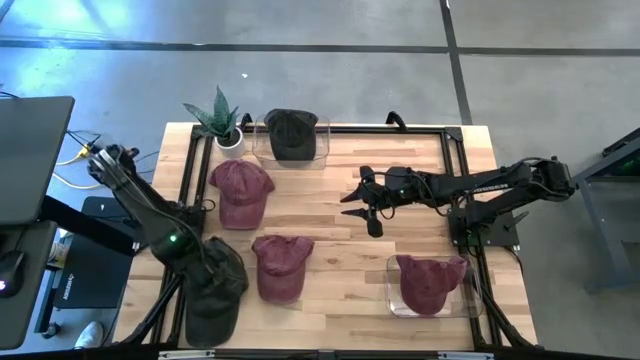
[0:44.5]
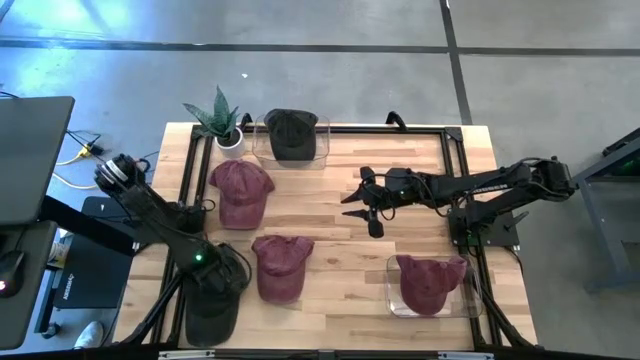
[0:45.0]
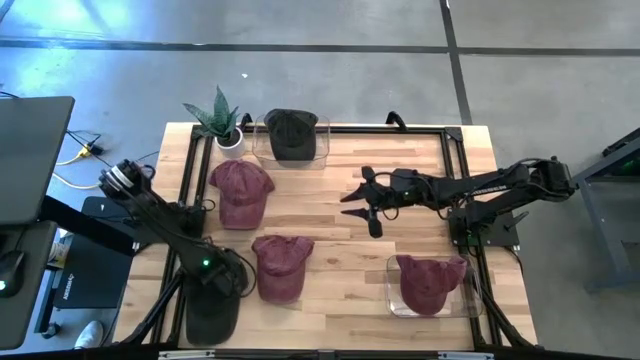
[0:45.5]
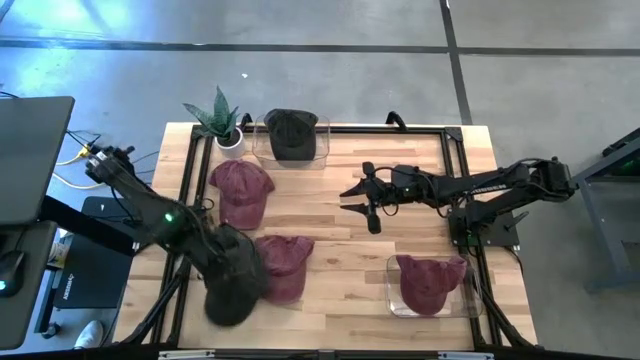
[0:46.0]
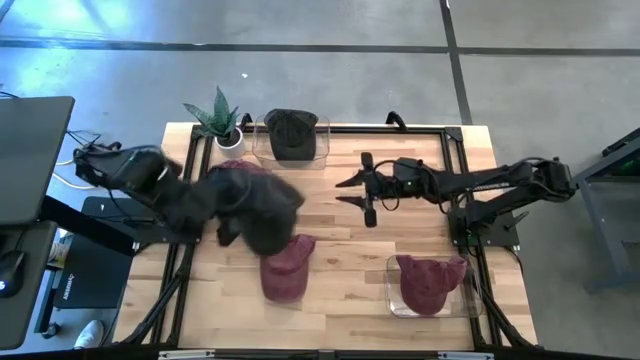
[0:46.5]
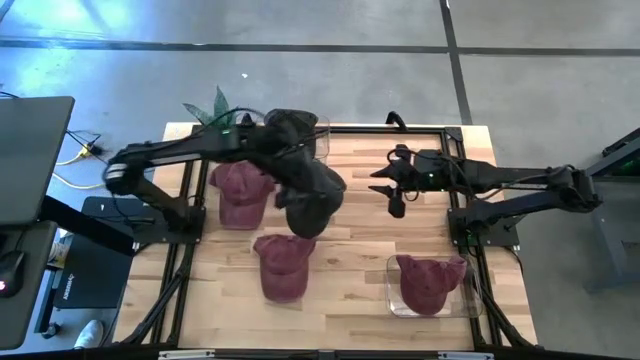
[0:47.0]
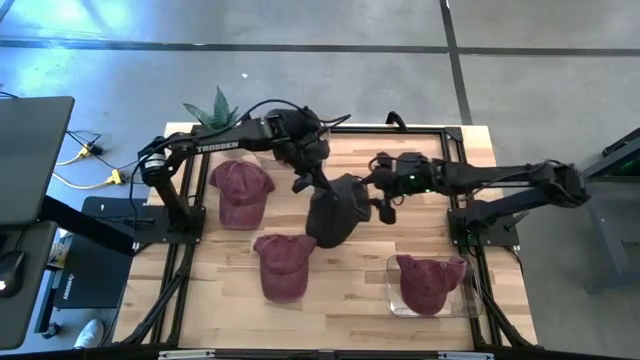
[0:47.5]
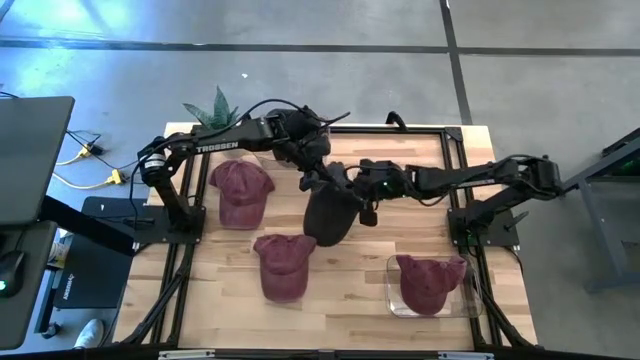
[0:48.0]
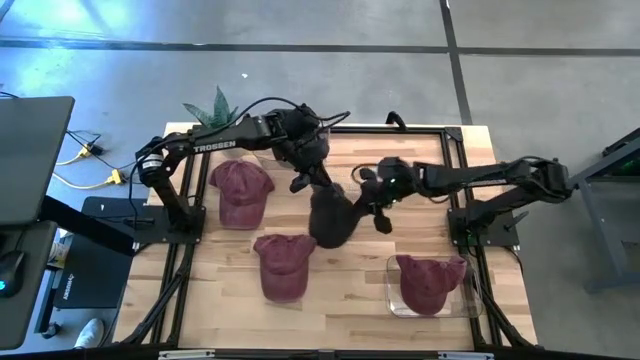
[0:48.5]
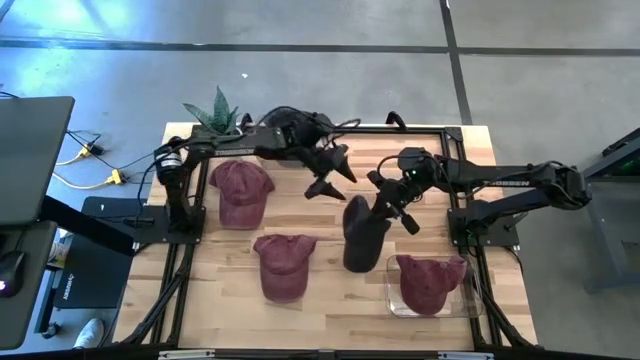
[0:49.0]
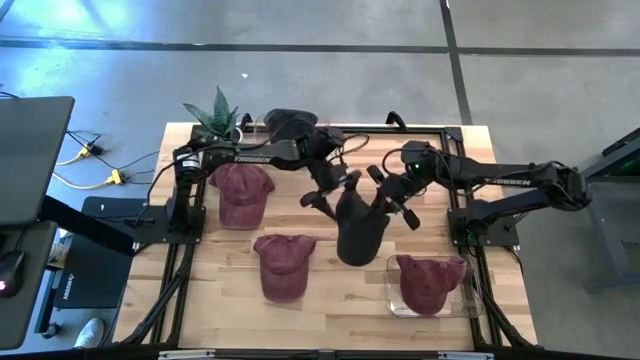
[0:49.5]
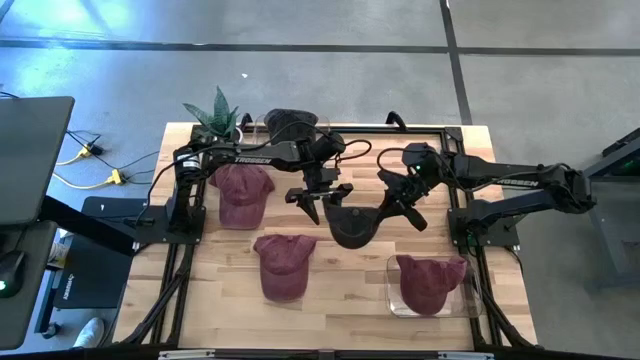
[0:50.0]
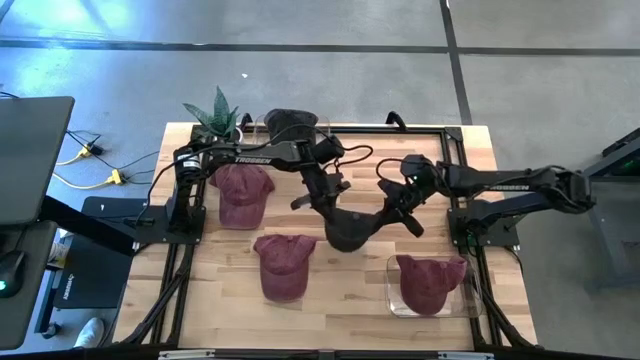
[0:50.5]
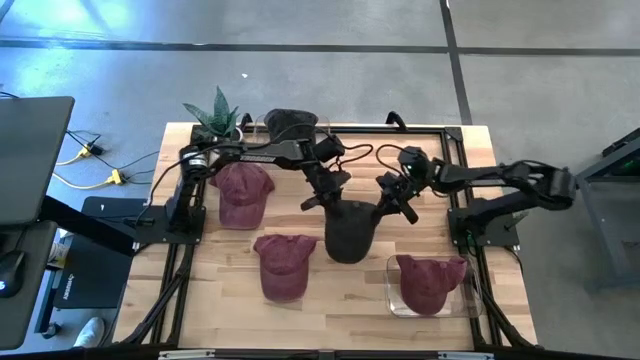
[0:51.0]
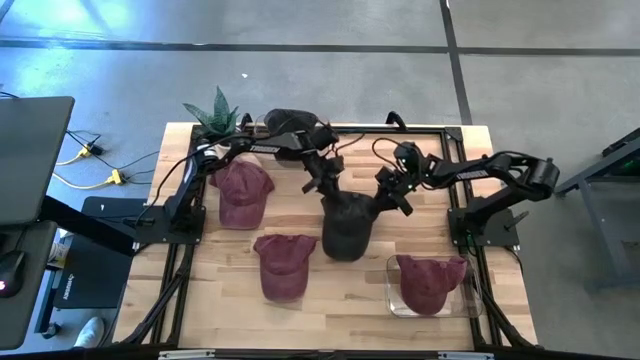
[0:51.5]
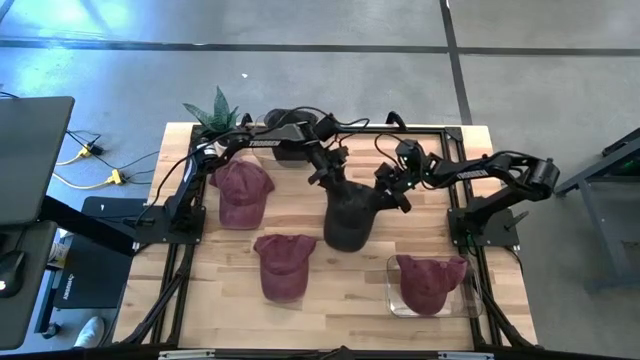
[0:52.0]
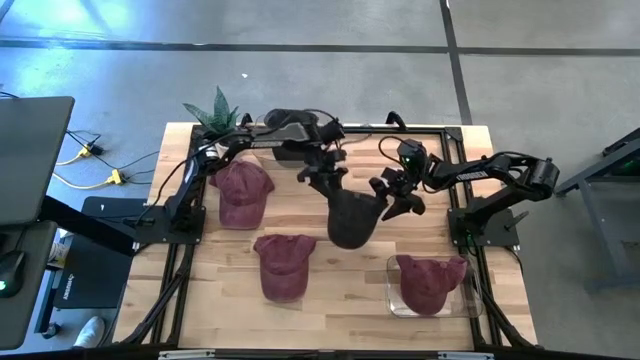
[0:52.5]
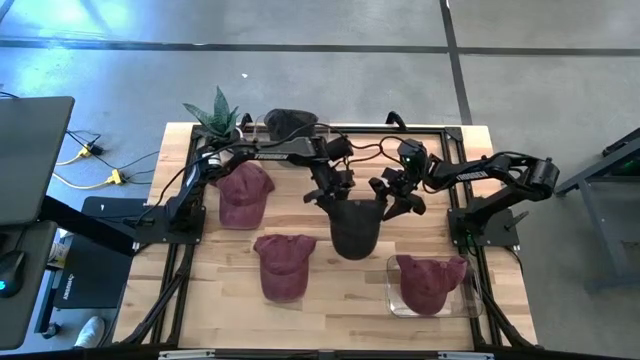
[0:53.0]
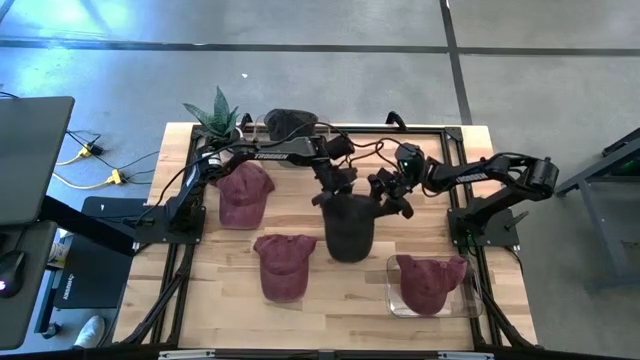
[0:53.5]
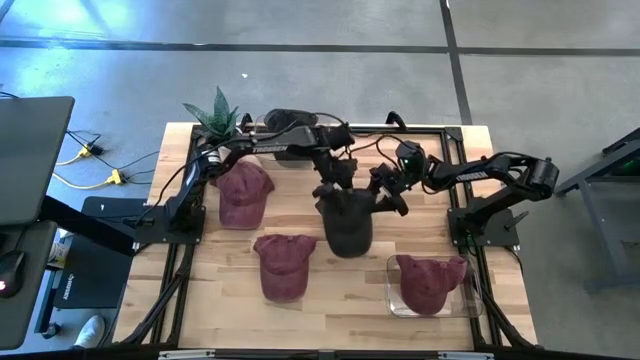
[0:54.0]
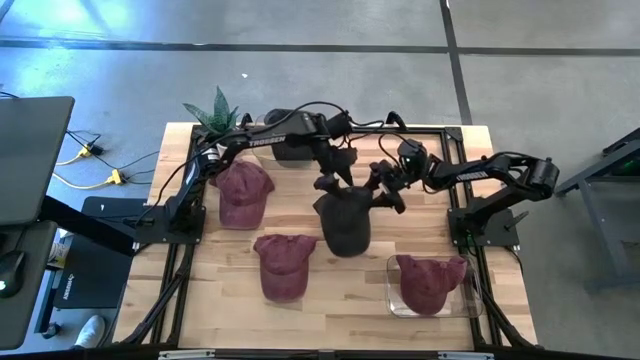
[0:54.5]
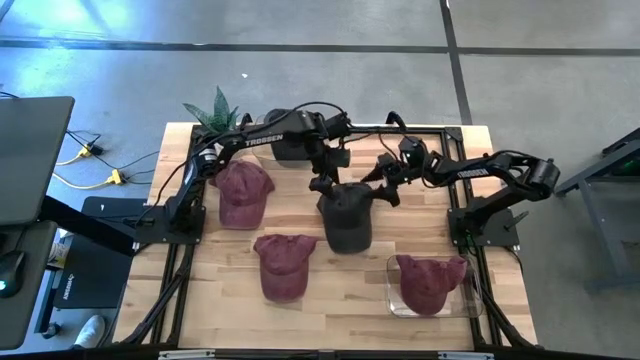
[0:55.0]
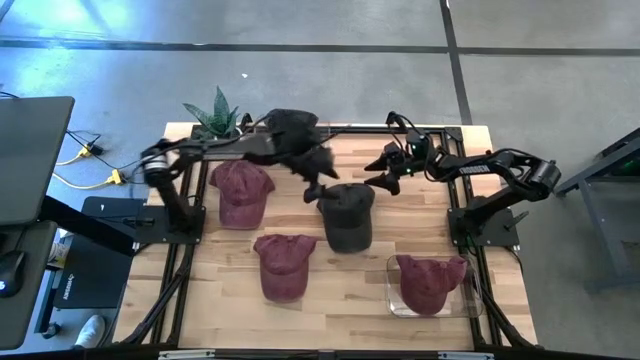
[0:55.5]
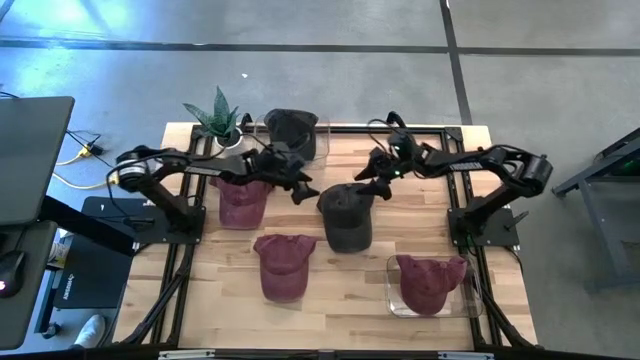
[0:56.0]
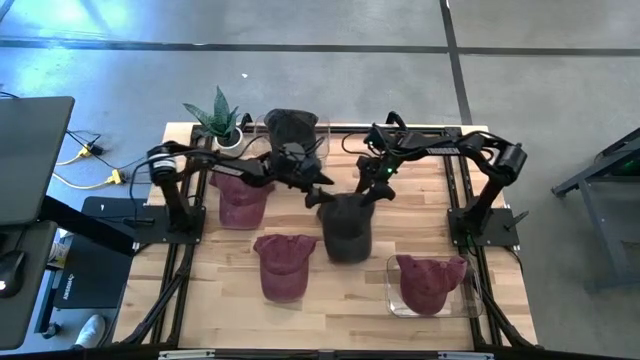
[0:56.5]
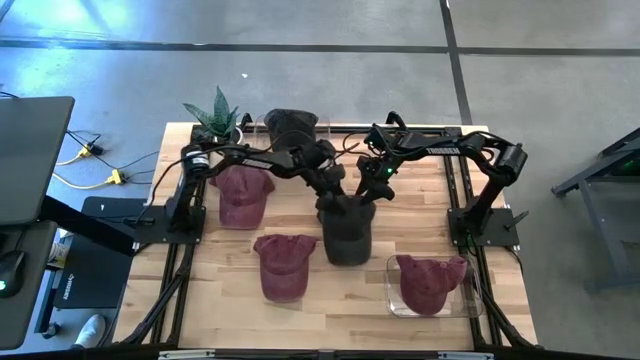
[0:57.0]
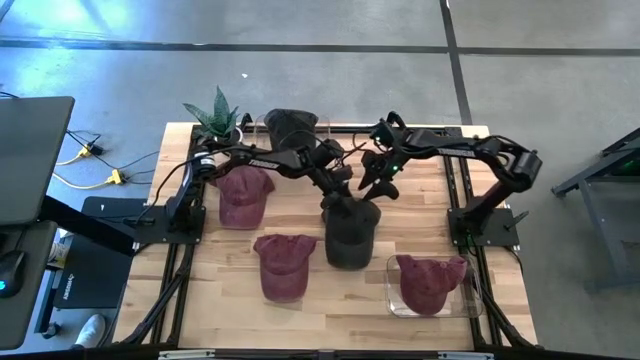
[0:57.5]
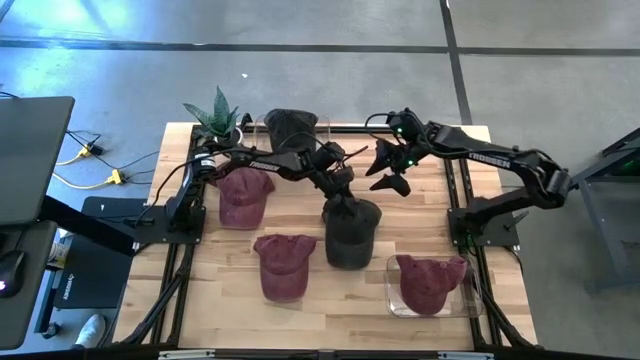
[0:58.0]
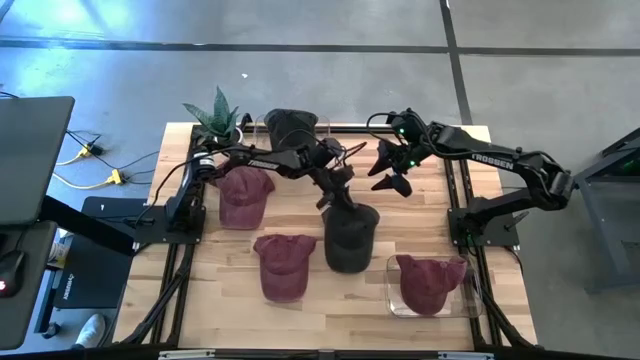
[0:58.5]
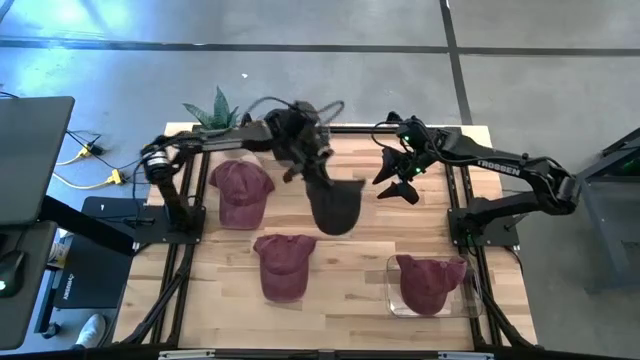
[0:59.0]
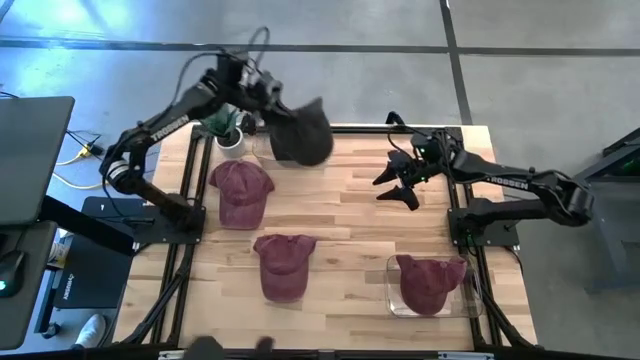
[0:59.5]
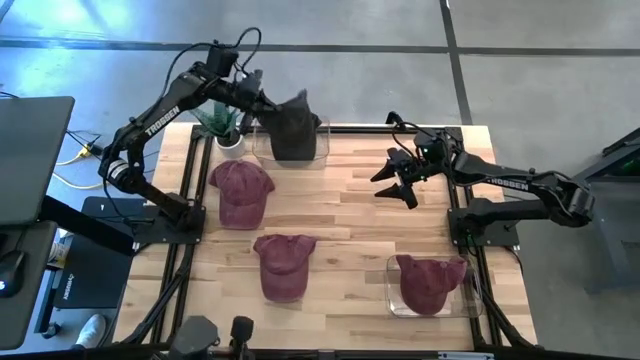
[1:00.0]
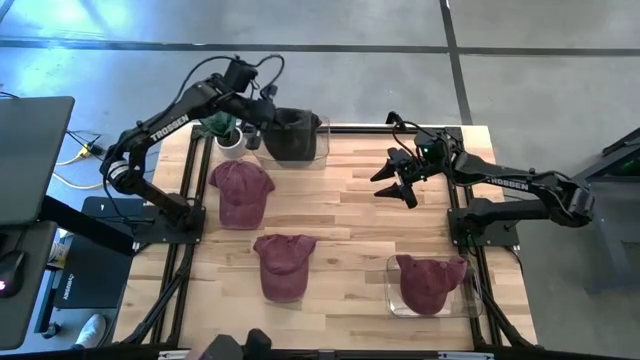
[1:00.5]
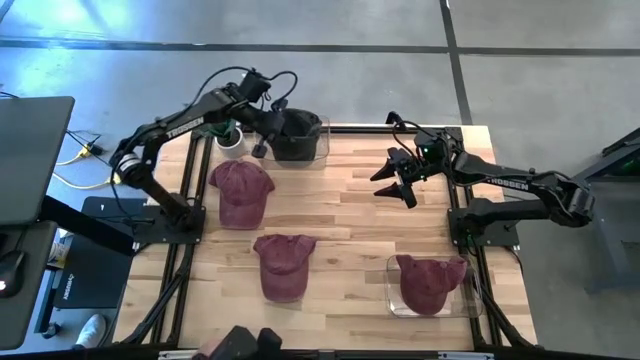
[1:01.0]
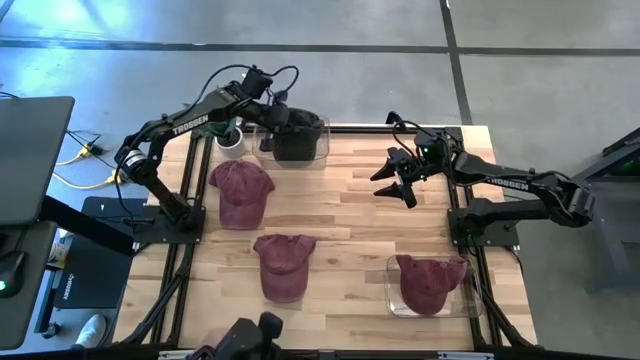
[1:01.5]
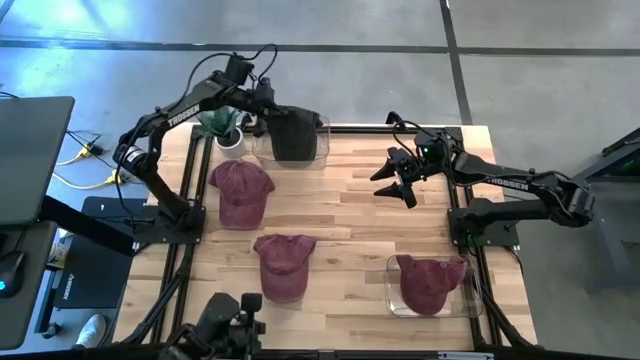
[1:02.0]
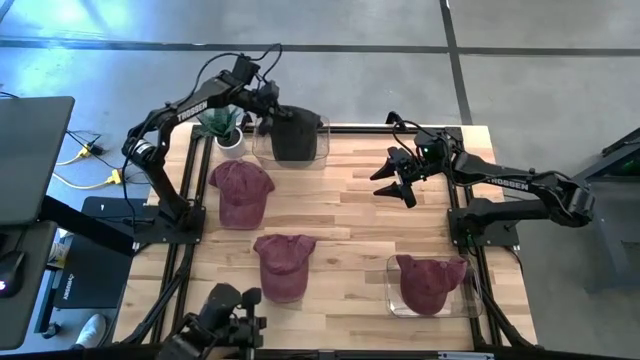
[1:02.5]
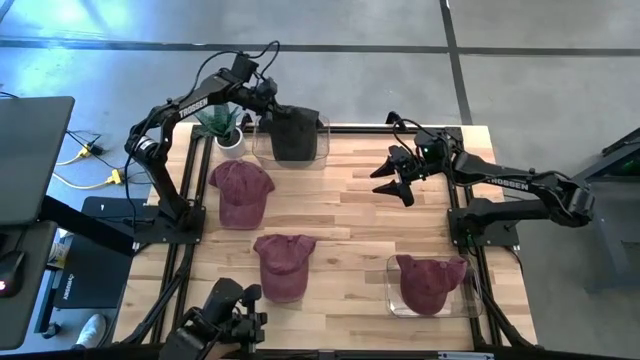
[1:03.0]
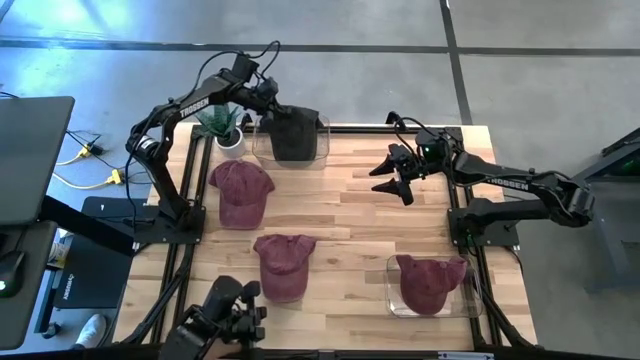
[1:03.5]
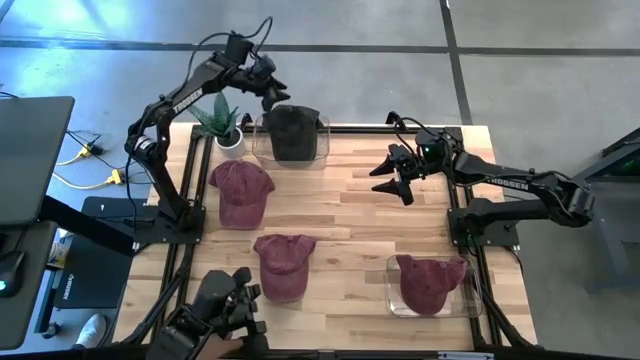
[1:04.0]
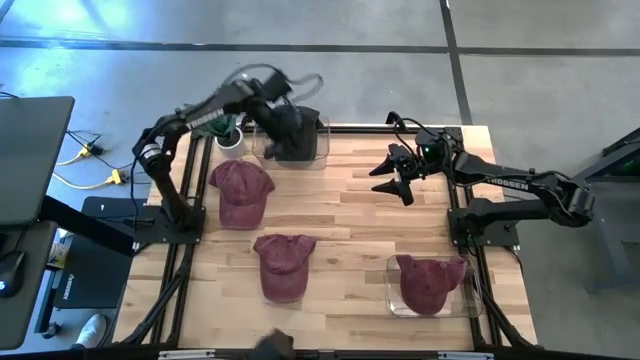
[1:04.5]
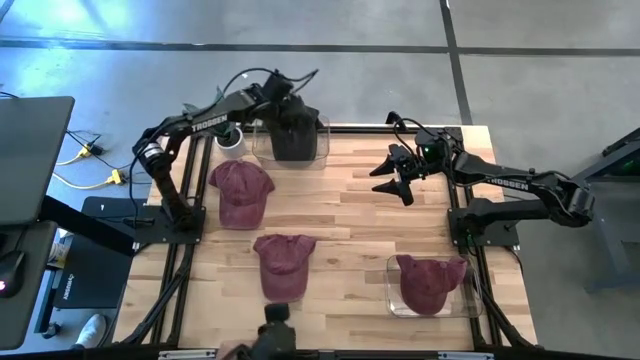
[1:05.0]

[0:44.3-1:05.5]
Task: Pick & Place hat
Put the black cap into the top transparent bin
